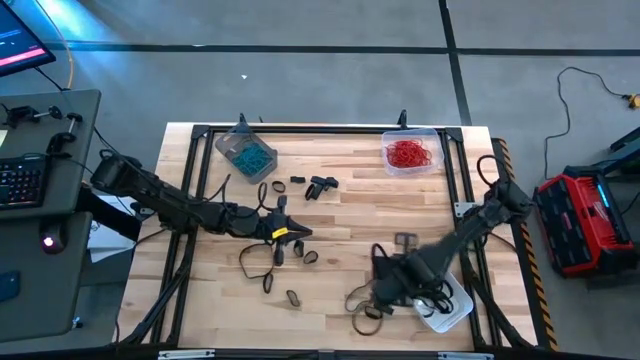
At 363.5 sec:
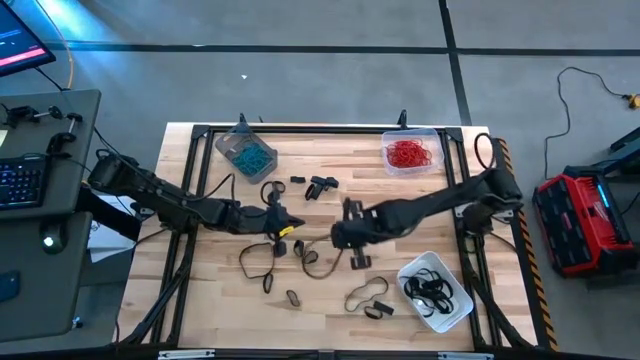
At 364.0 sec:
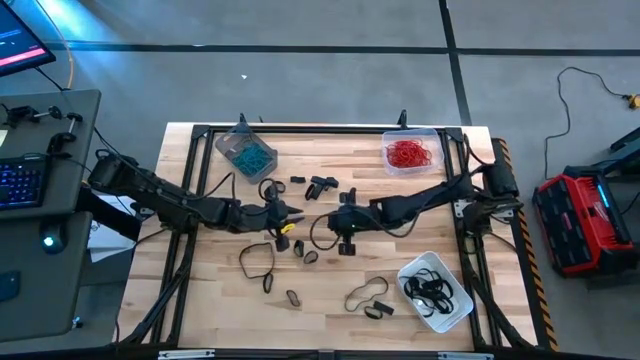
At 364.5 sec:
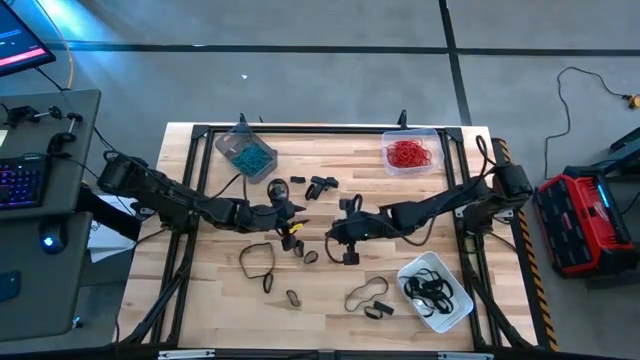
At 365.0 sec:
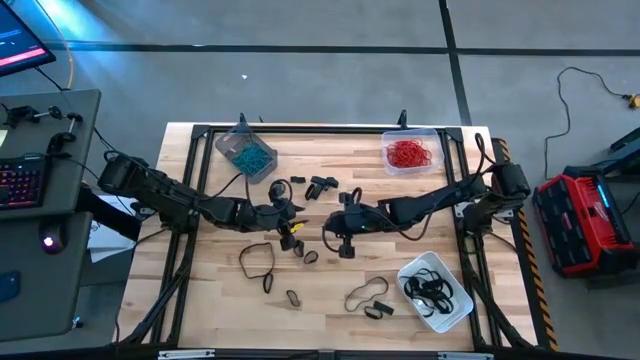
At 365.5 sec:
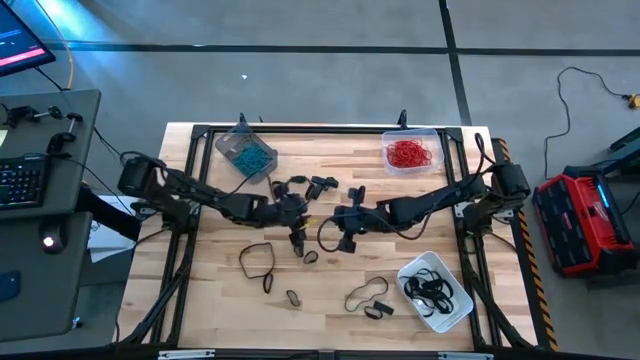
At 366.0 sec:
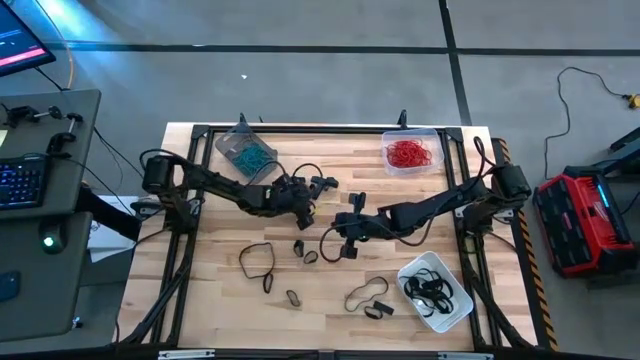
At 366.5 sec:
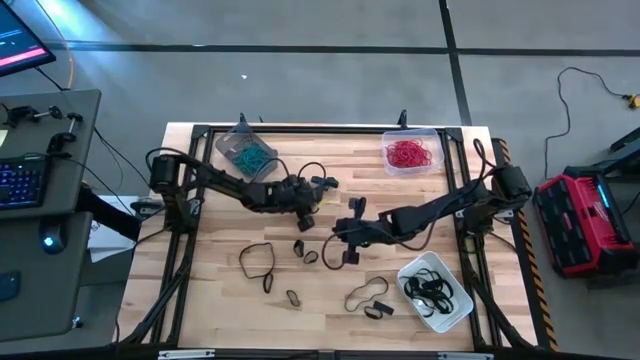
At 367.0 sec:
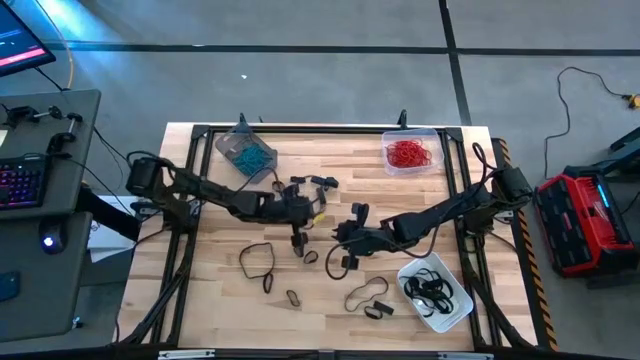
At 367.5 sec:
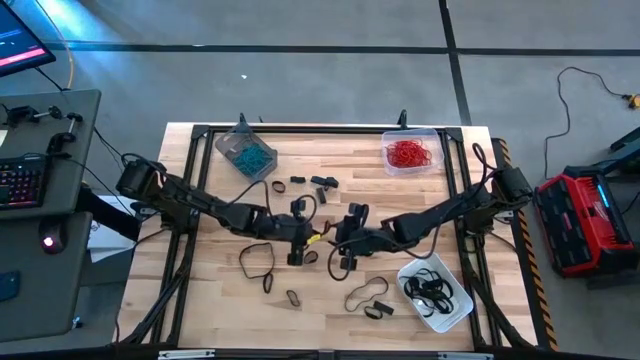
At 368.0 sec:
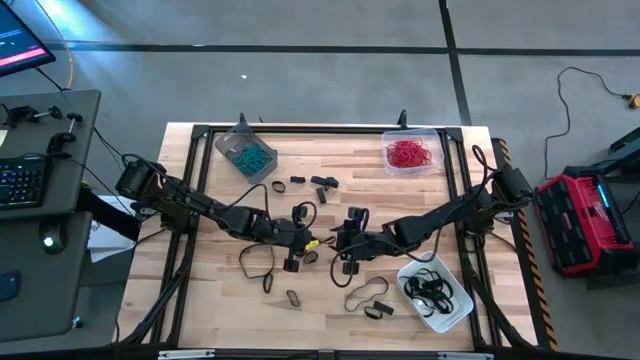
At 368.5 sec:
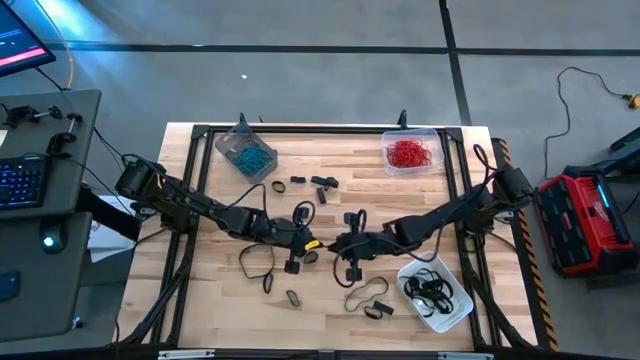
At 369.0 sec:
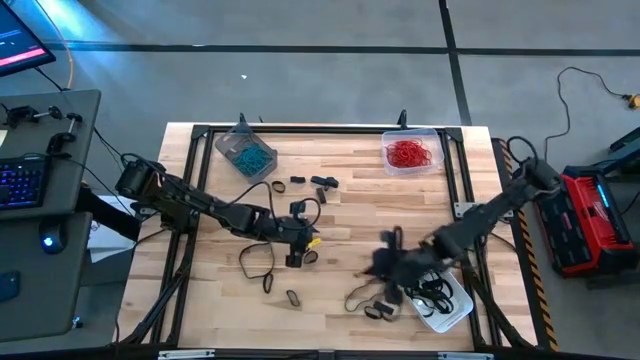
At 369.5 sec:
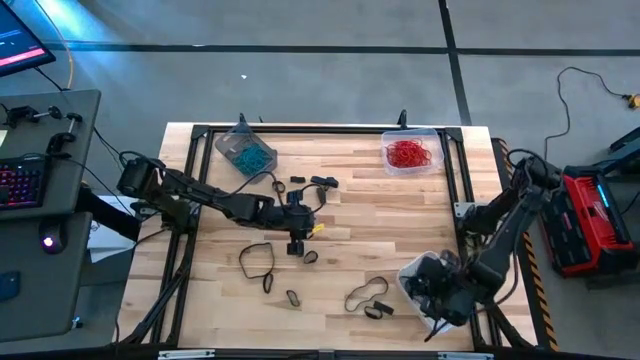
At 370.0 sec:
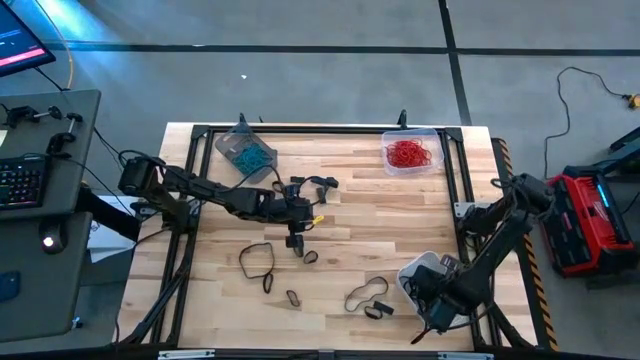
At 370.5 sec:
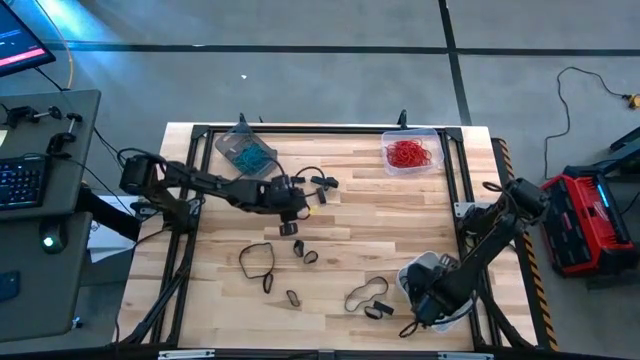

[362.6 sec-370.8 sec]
Task: Sort rubber bands into baskets
Put the black rubber band into the white bin

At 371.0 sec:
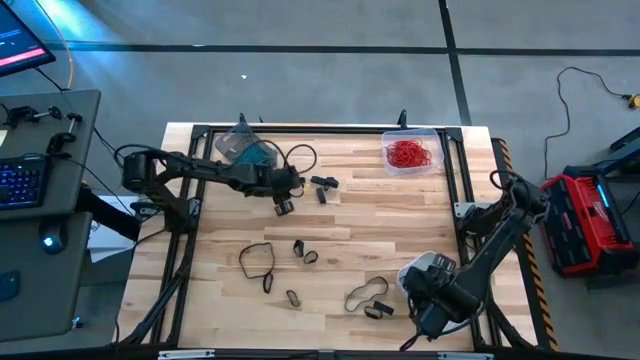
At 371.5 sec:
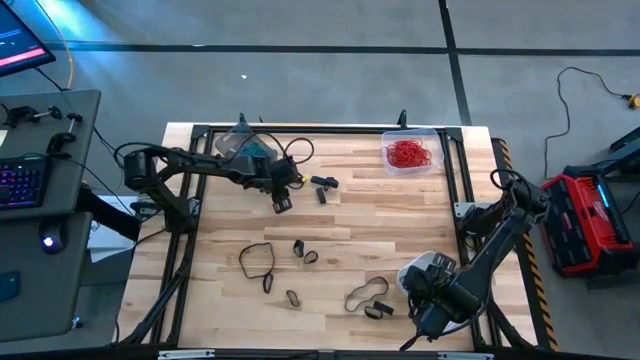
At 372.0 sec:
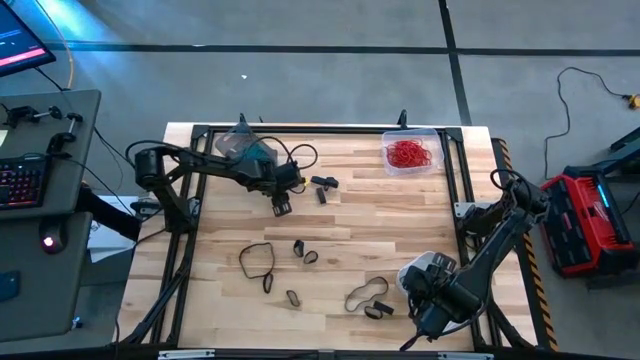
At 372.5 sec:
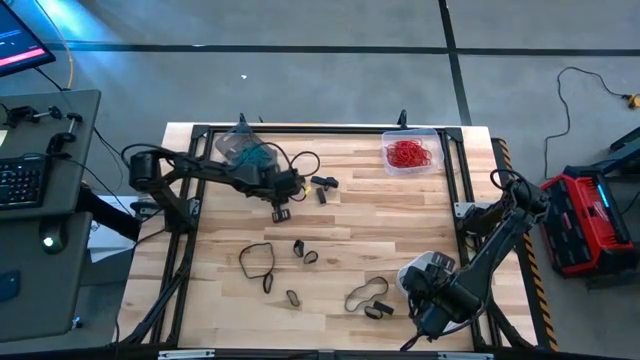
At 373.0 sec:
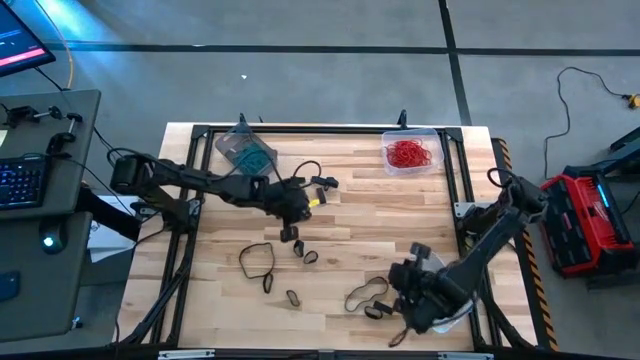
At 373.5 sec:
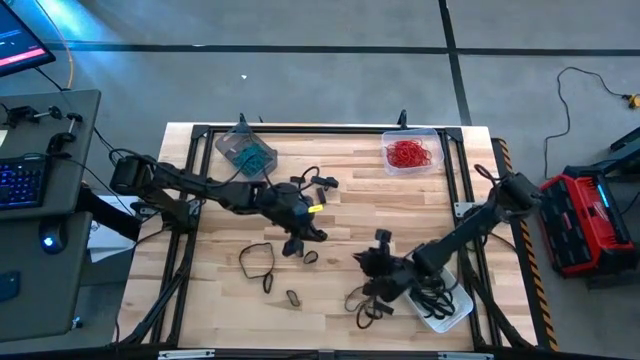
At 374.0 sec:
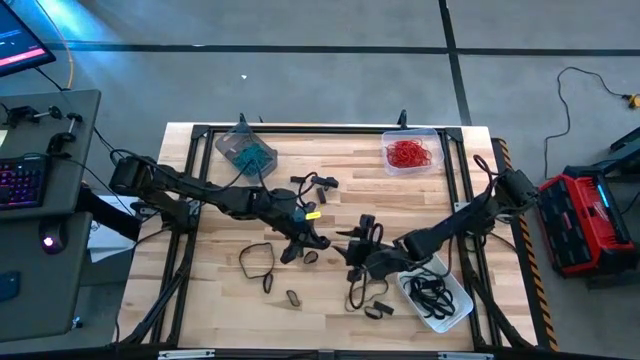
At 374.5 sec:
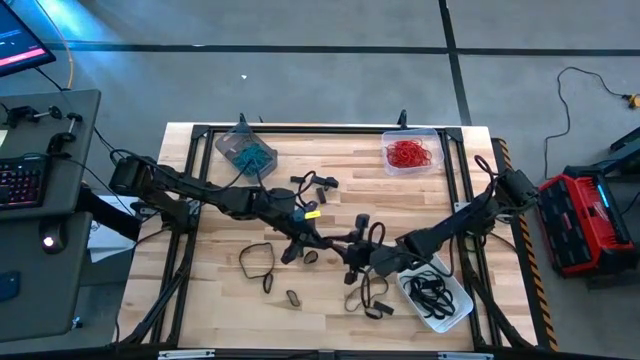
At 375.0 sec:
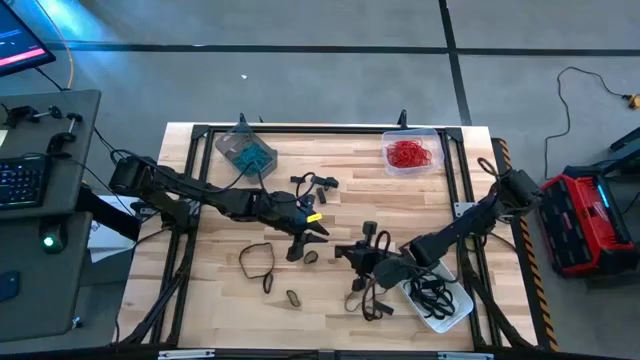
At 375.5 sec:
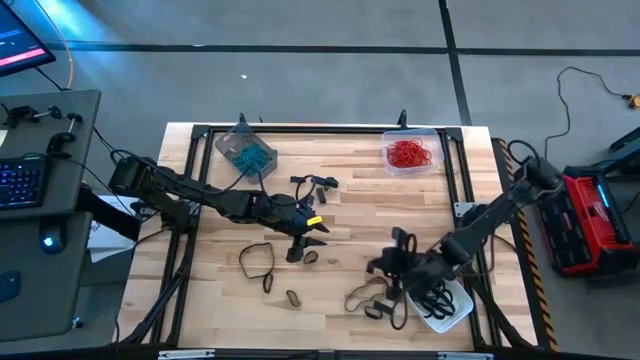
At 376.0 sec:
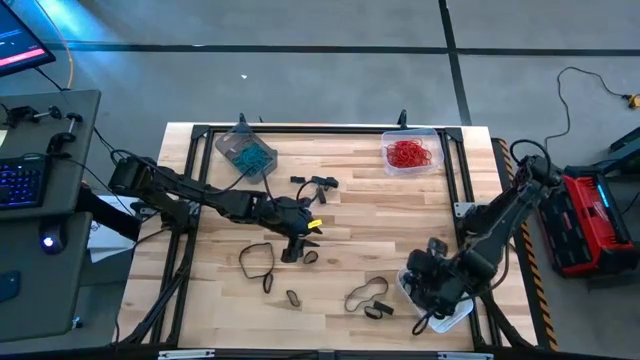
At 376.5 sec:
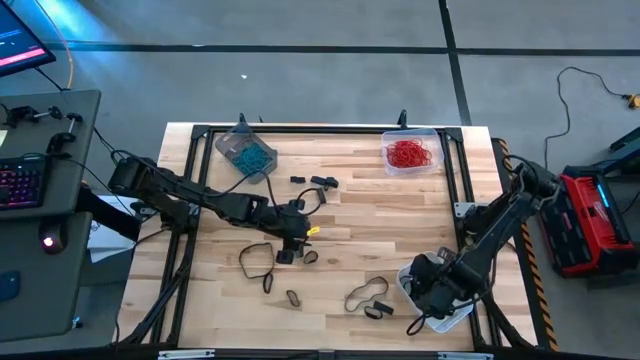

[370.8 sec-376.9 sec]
Put the black rubber band into the white bin

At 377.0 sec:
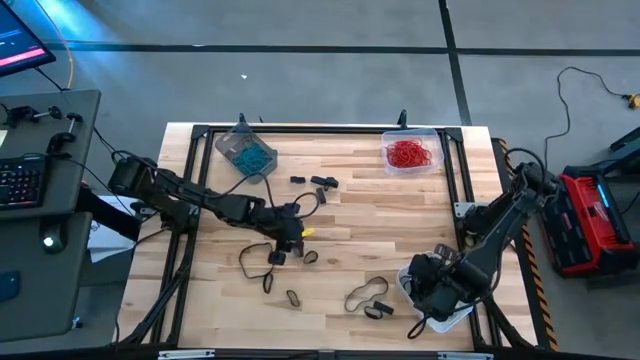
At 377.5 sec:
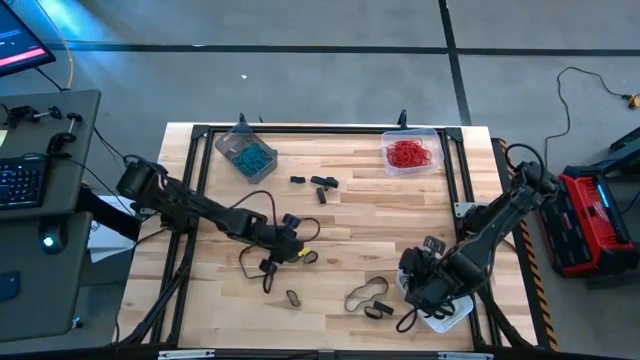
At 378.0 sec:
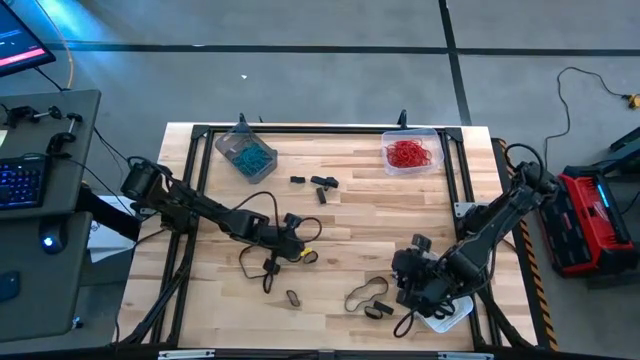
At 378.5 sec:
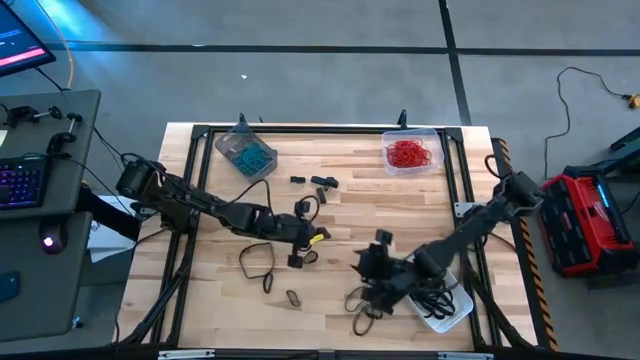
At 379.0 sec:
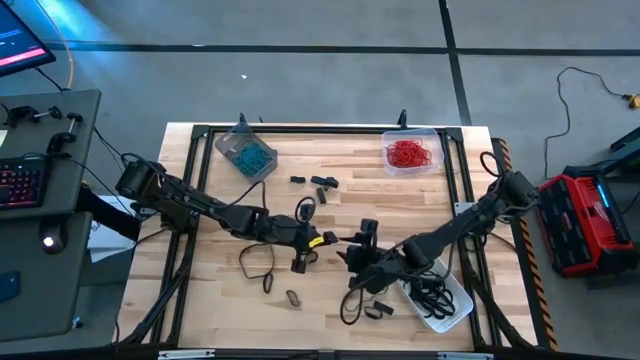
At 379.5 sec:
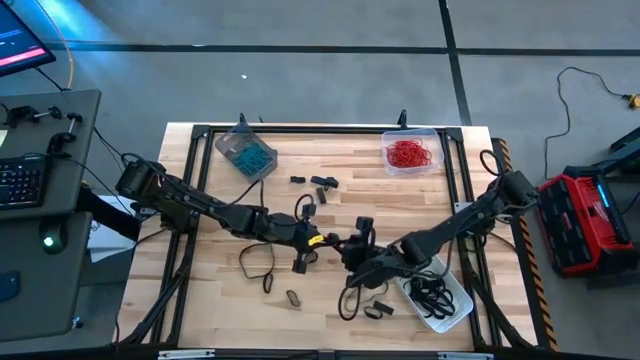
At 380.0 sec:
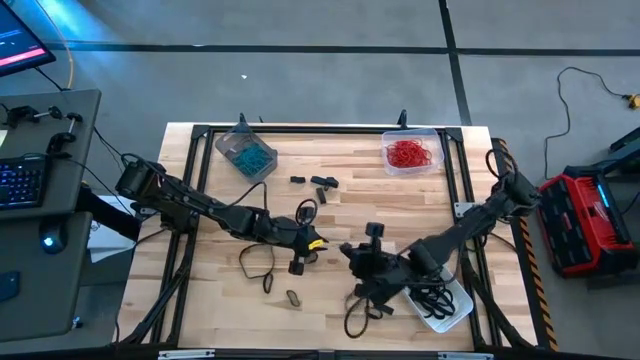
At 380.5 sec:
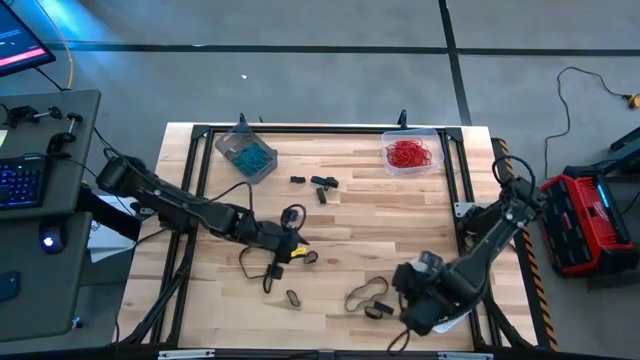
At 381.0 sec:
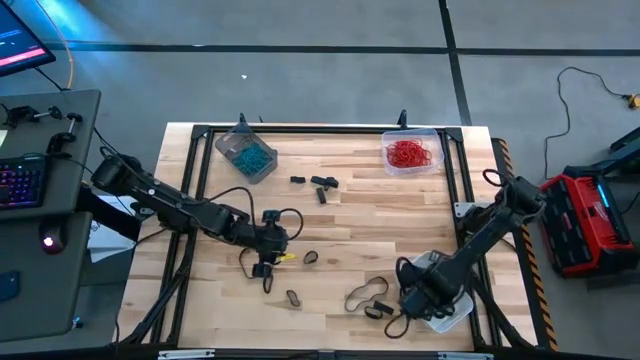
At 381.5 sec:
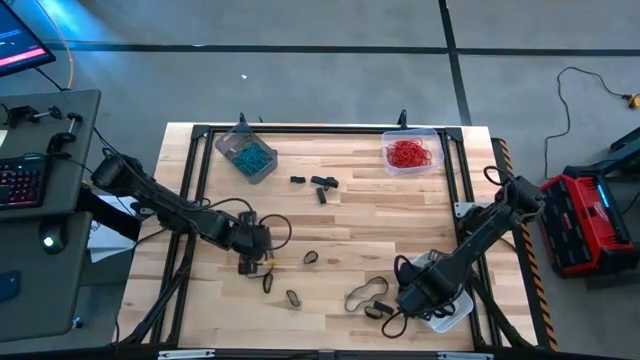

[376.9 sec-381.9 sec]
Put the black rubber band into the white bin

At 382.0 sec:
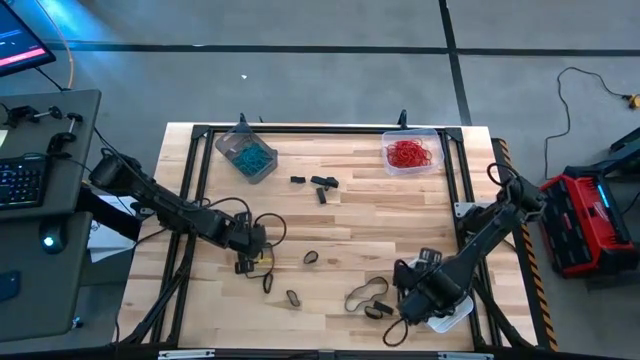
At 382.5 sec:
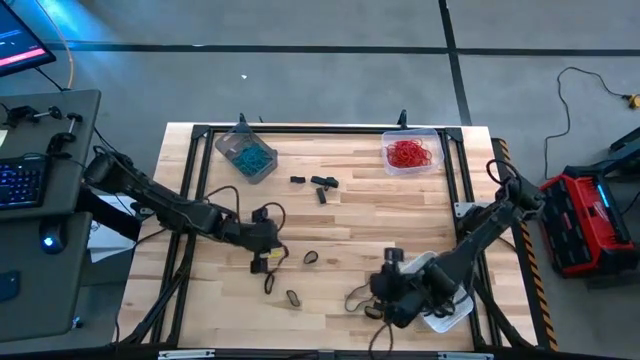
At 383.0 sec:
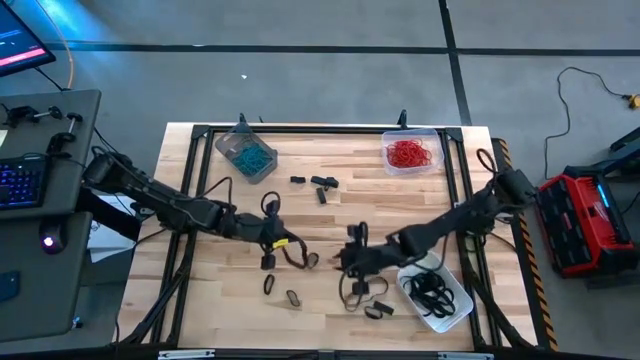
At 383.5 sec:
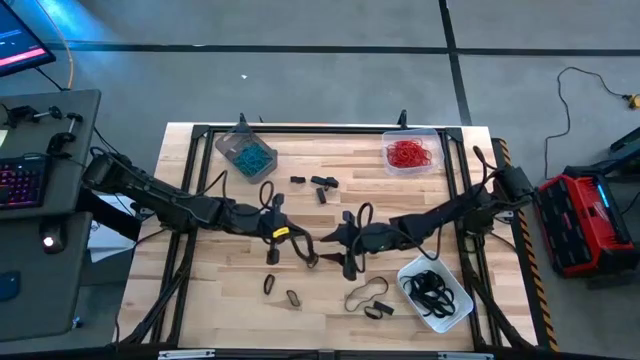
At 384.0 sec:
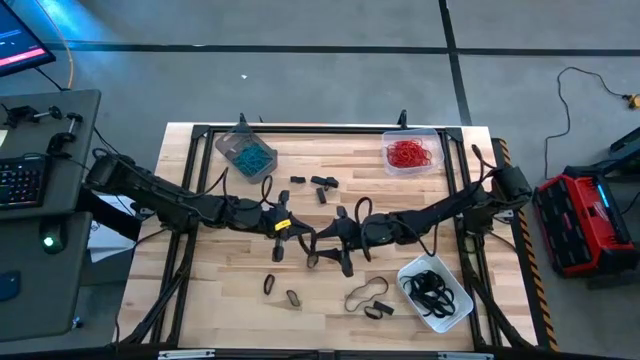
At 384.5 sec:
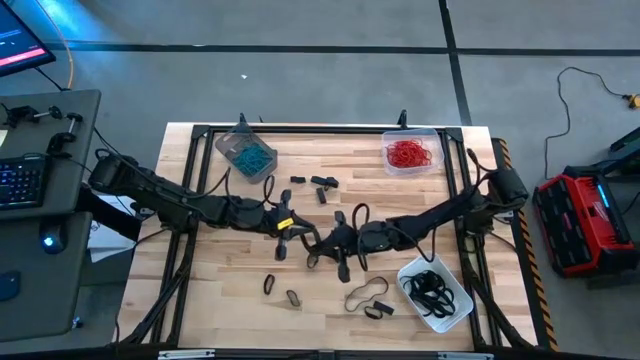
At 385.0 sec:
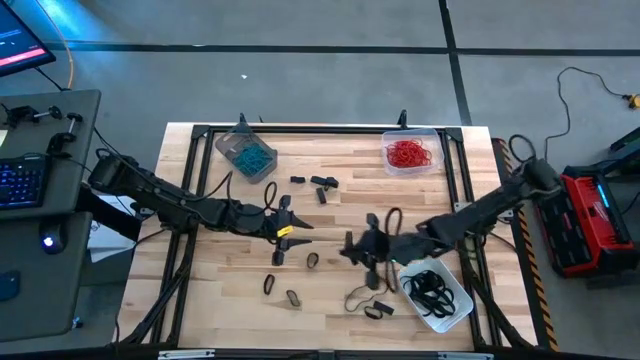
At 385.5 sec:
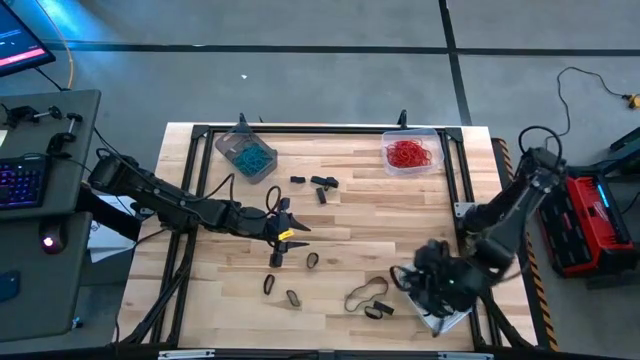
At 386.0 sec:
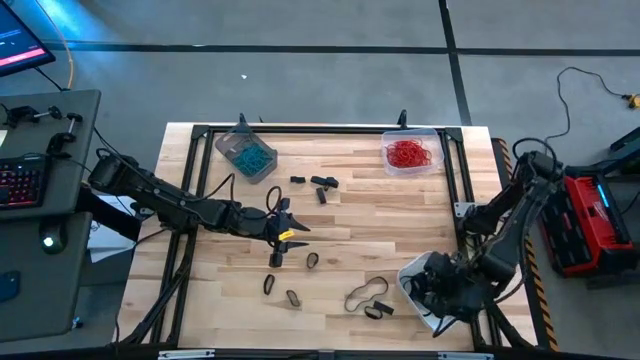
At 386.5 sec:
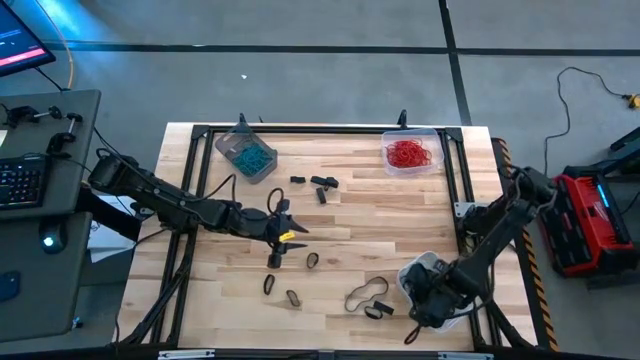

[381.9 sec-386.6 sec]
Put the black rubber band into the white bin
